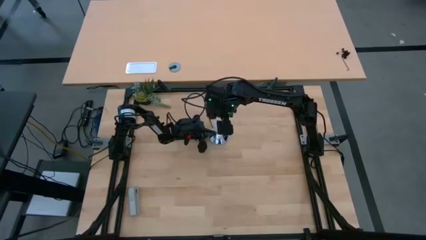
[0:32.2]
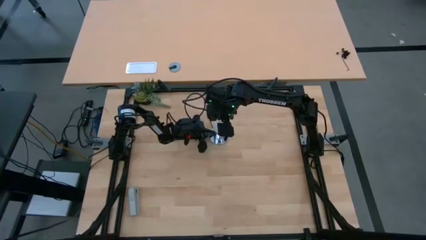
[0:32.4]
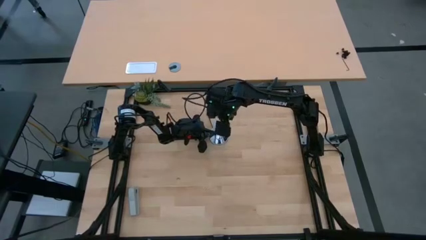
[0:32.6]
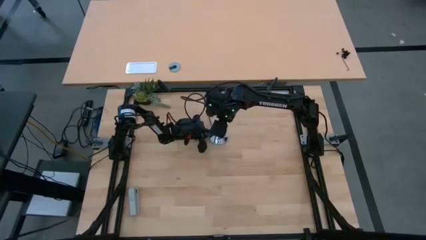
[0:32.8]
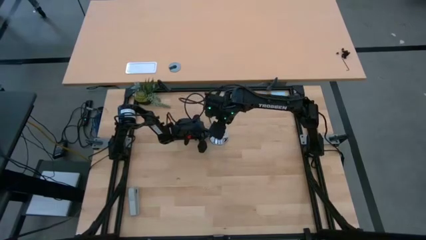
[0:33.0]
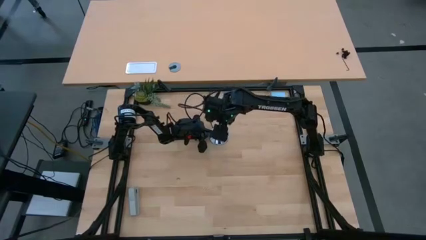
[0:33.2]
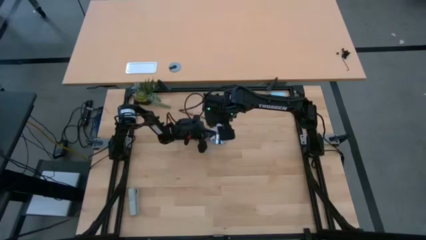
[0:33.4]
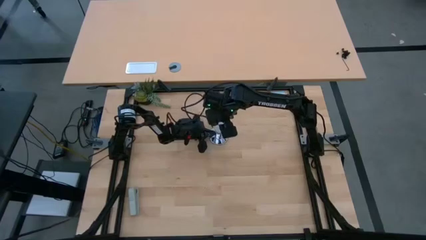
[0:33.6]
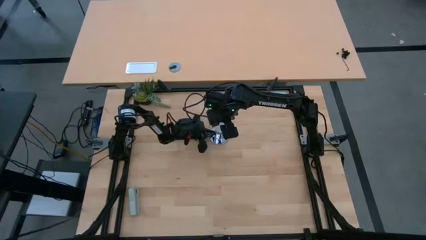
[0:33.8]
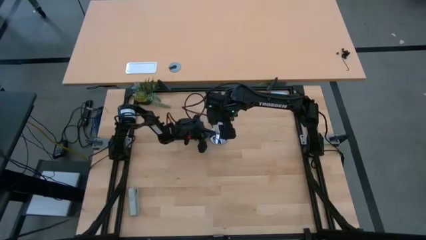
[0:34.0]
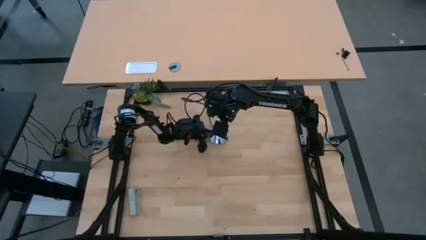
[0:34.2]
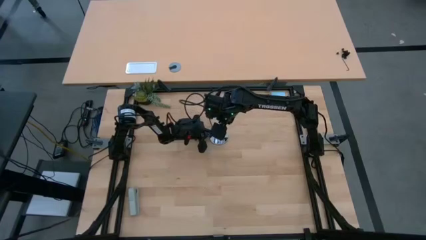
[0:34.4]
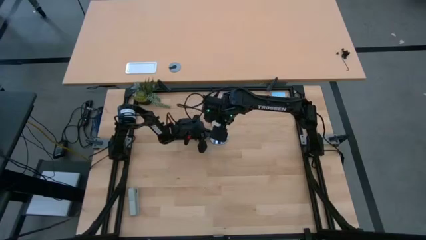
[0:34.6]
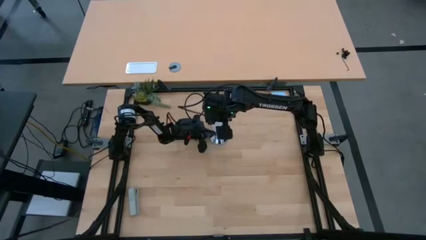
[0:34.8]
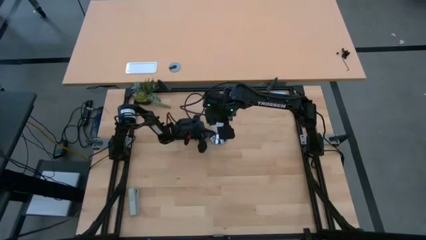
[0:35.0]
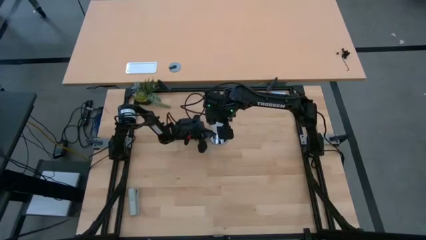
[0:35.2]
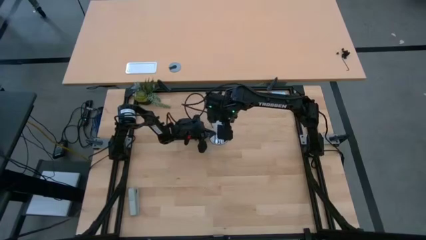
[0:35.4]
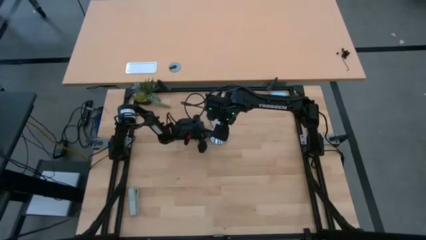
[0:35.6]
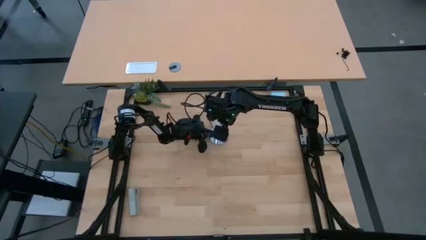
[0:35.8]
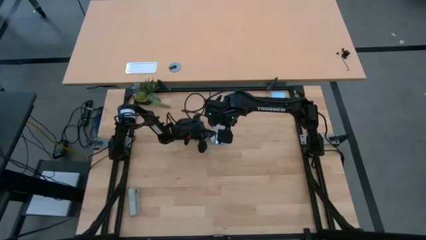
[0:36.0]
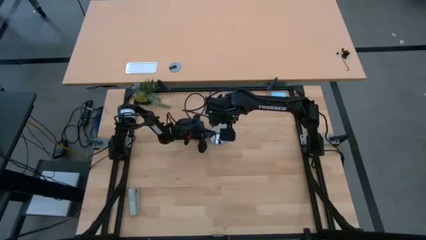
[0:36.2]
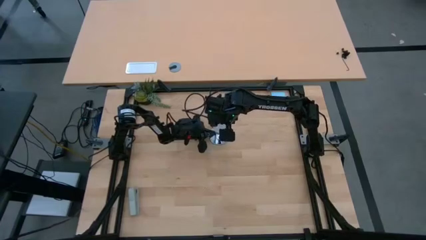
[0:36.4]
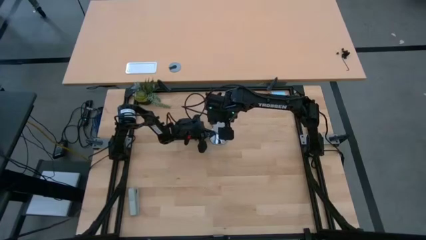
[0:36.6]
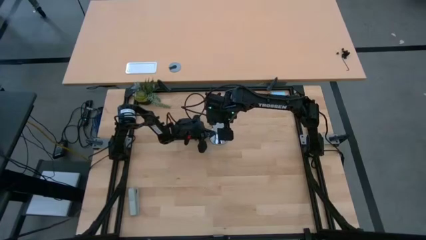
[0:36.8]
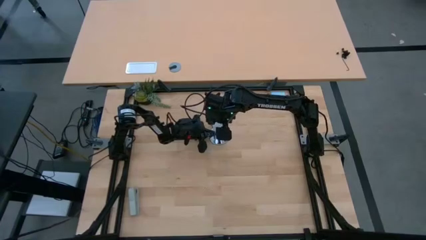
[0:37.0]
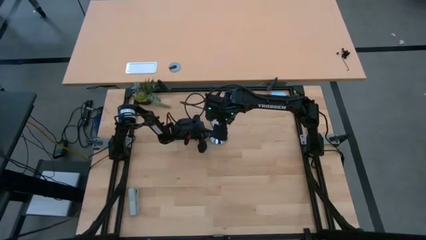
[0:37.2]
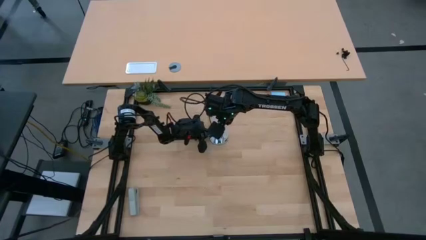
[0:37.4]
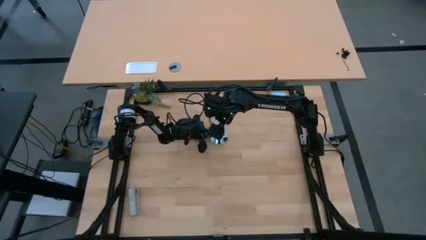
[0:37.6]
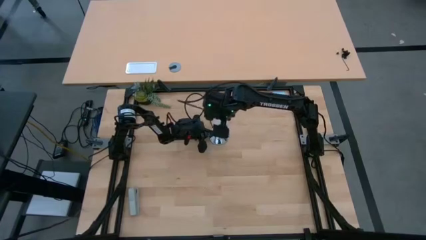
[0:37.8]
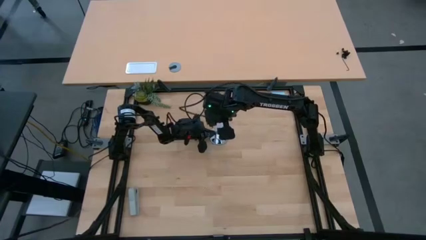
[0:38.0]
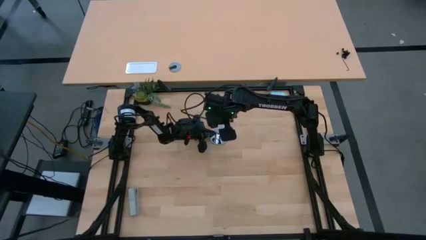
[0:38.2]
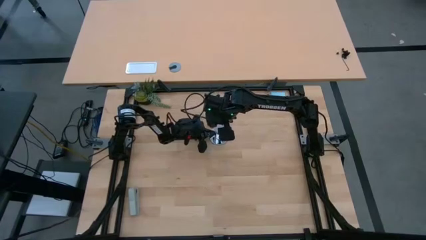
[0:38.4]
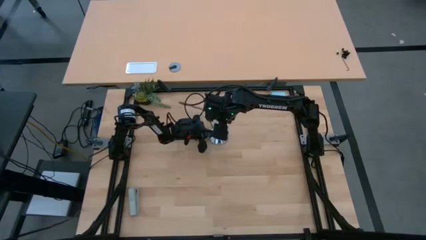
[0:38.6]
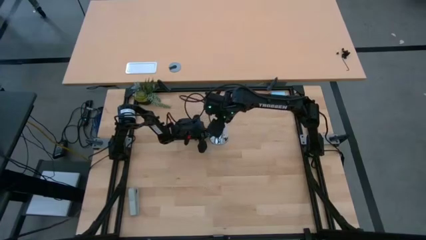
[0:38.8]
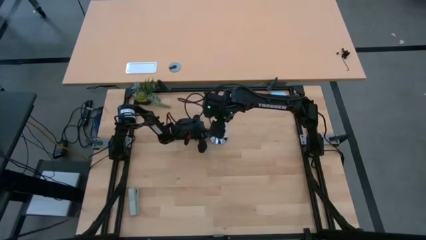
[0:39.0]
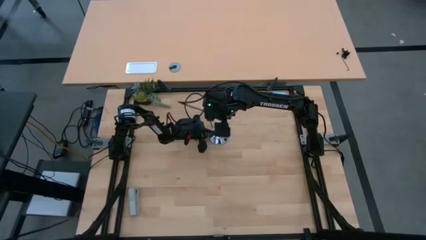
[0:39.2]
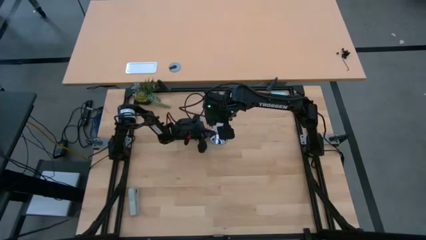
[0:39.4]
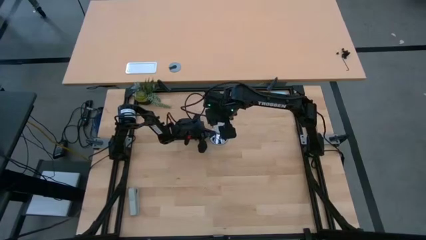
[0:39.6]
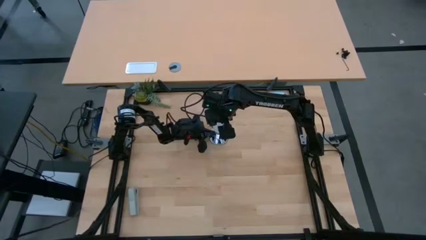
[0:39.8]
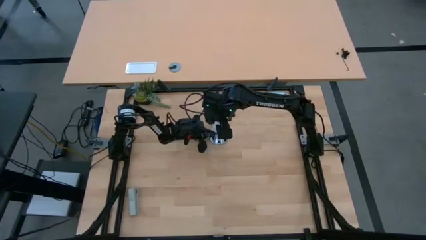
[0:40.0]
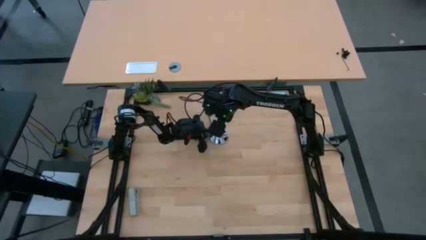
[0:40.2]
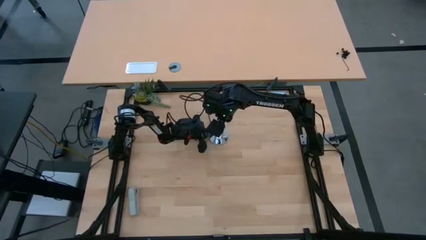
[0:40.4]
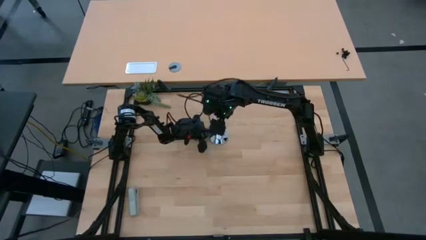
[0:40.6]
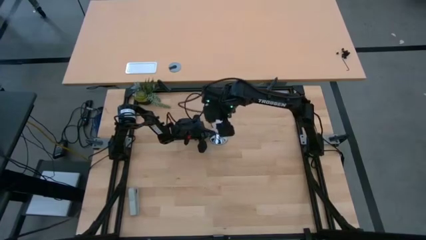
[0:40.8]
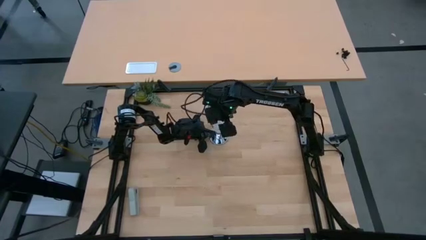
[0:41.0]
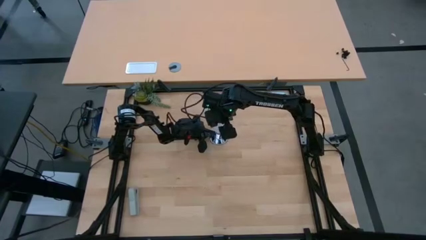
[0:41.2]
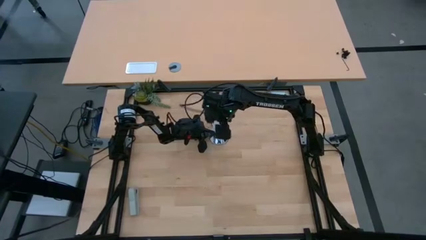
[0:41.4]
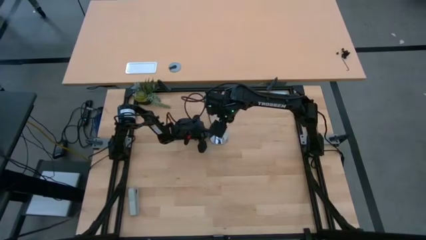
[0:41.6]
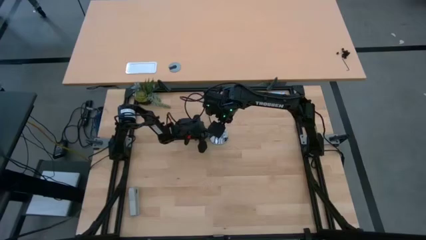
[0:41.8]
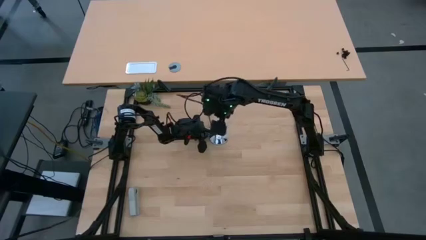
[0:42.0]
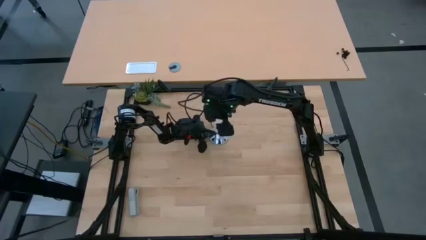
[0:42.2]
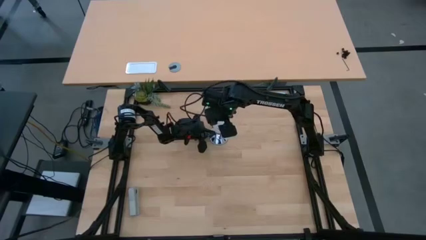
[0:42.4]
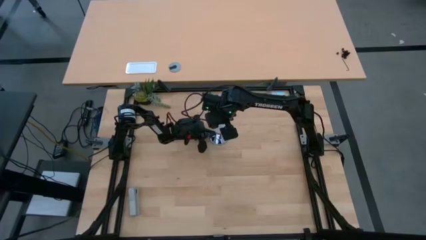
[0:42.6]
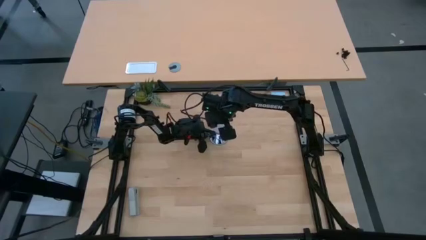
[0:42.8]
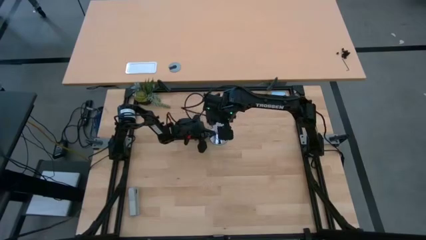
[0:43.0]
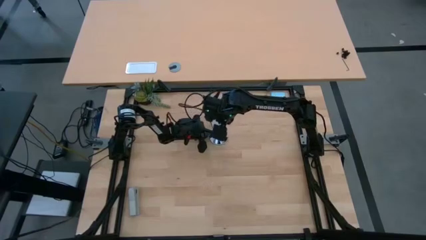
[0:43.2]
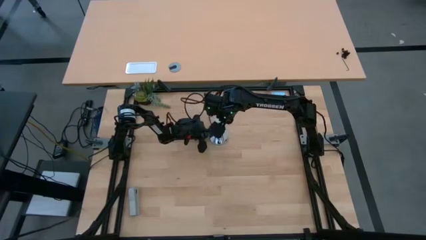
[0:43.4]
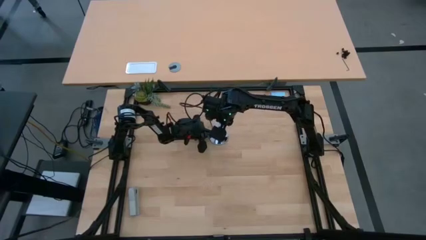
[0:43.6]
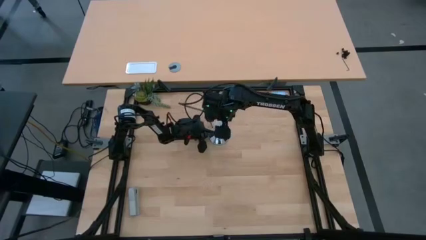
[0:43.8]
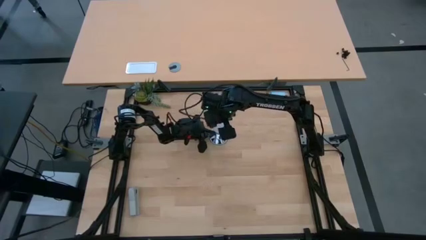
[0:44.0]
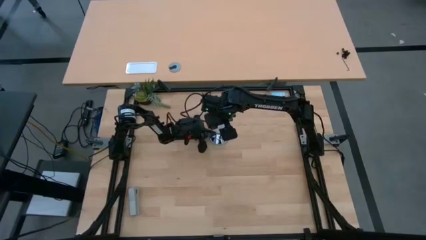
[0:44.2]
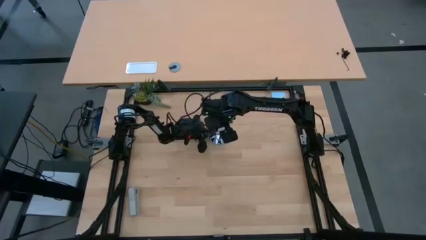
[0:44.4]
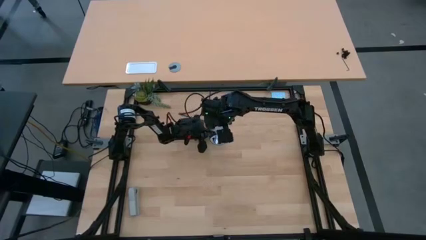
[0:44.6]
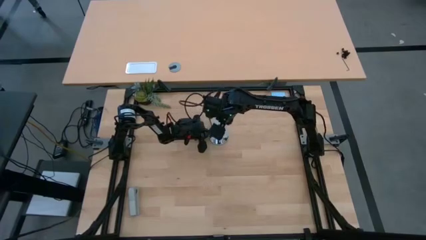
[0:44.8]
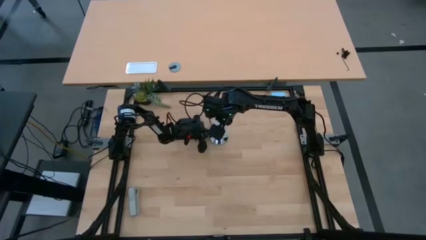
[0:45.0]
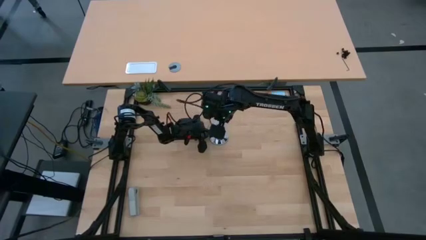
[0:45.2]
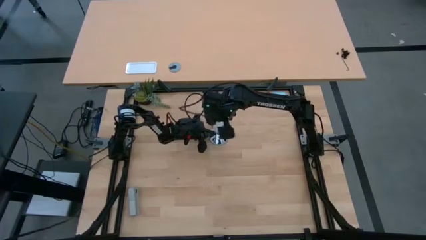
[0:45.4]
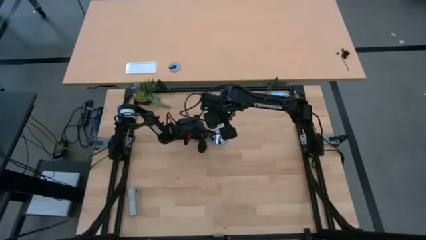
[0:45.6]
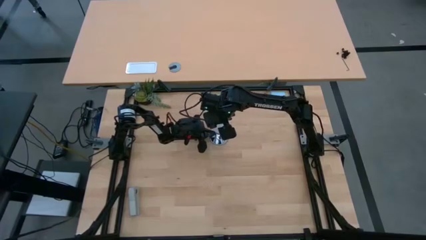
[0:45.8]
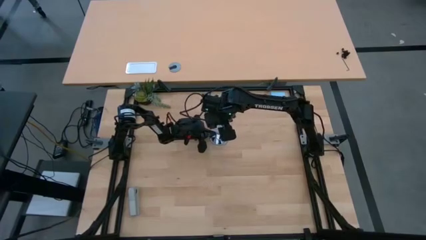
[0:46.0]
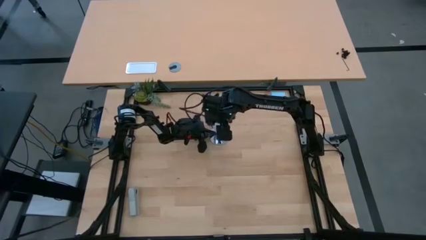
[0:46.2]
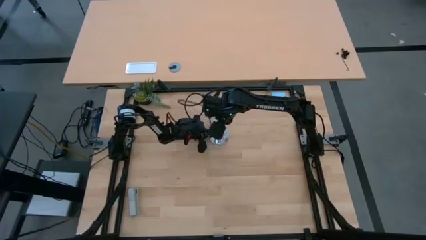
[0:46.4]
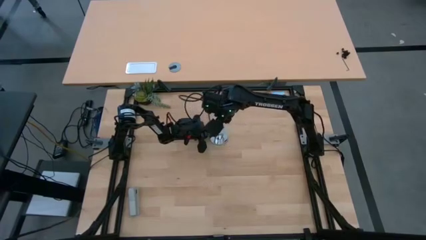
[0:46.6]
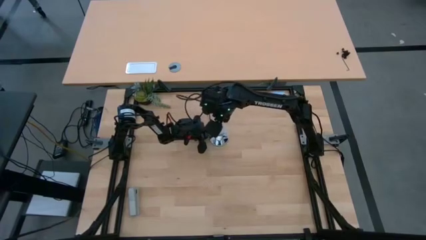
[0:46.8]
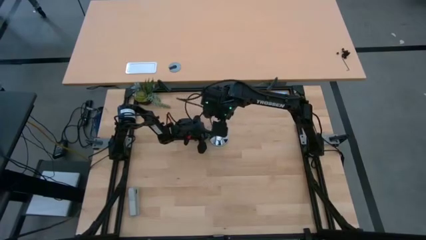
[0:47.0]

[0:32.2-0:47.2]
Task: Screw lightbulb
Insert the white lightbulb into the silver lamp
